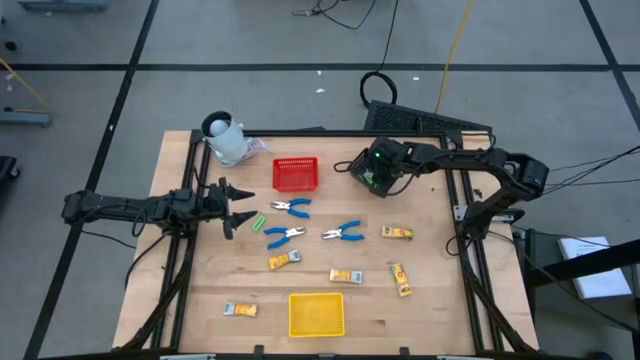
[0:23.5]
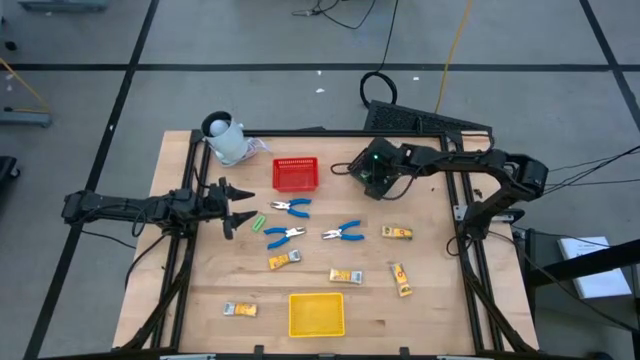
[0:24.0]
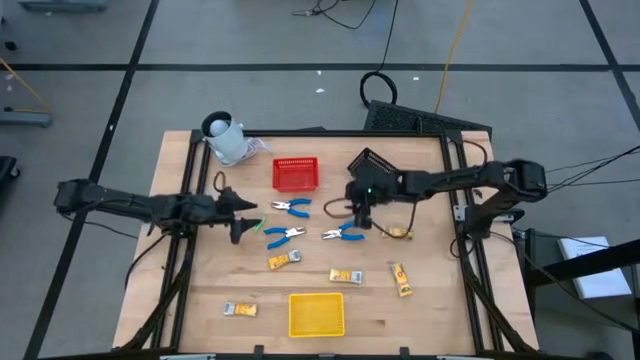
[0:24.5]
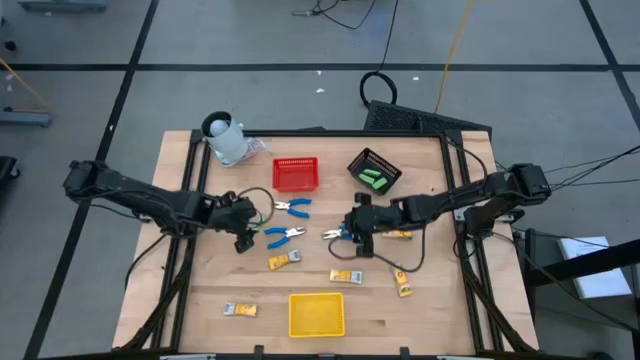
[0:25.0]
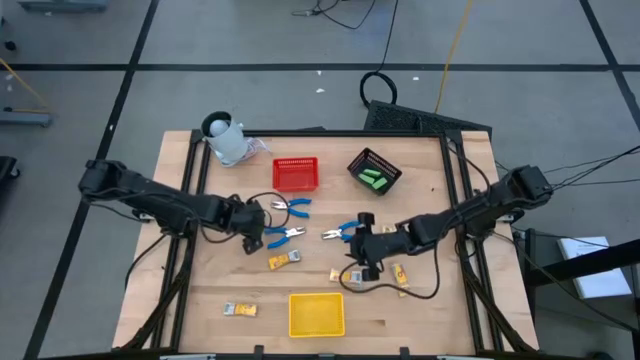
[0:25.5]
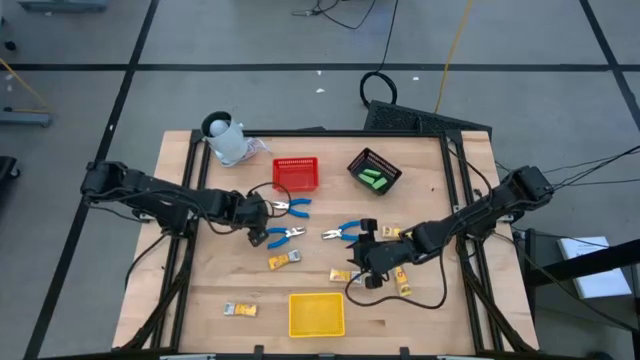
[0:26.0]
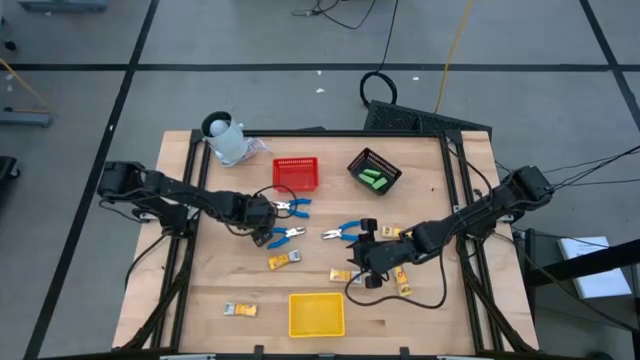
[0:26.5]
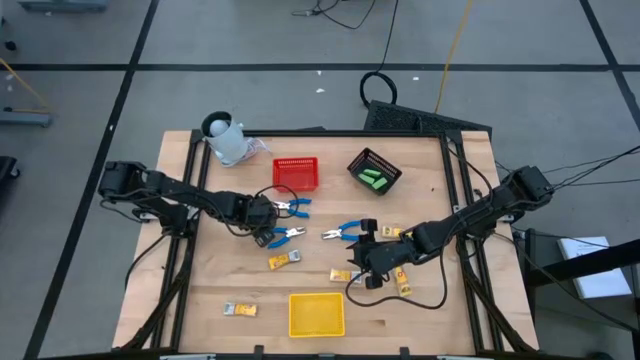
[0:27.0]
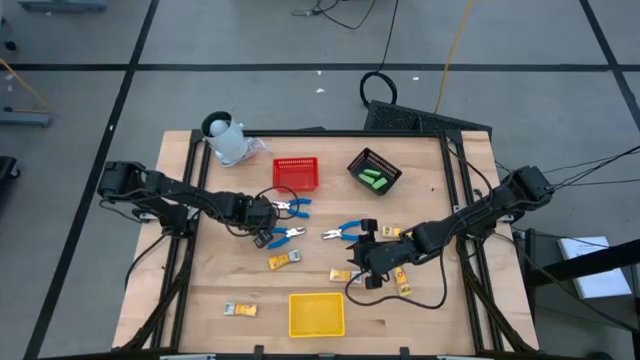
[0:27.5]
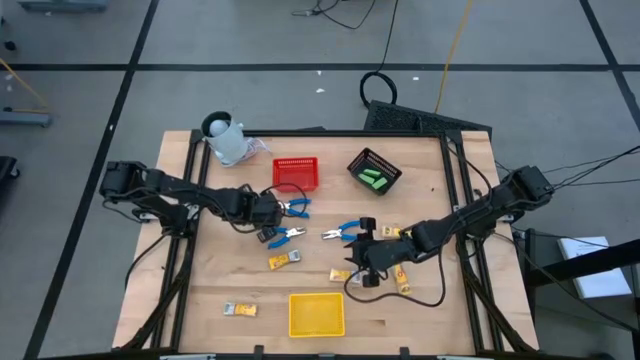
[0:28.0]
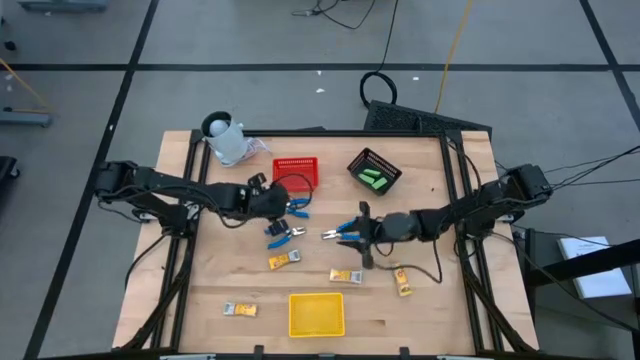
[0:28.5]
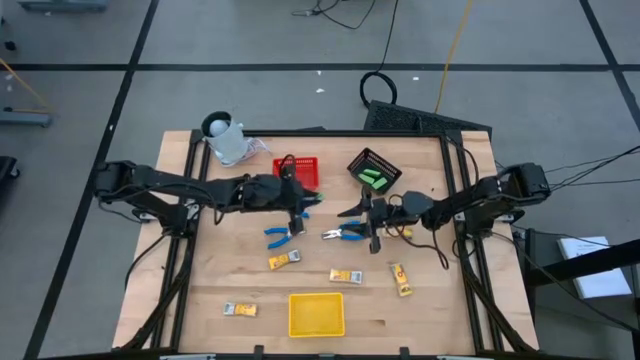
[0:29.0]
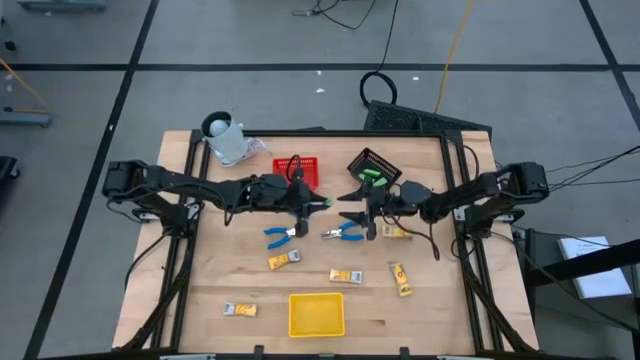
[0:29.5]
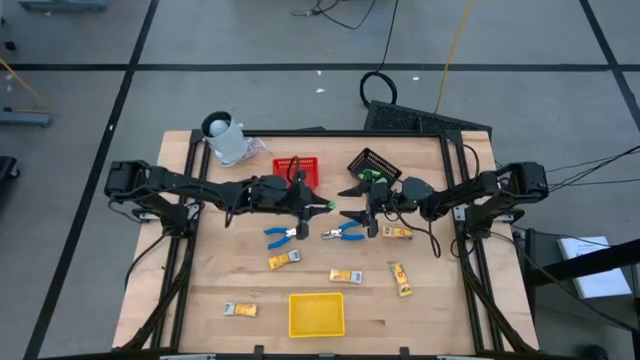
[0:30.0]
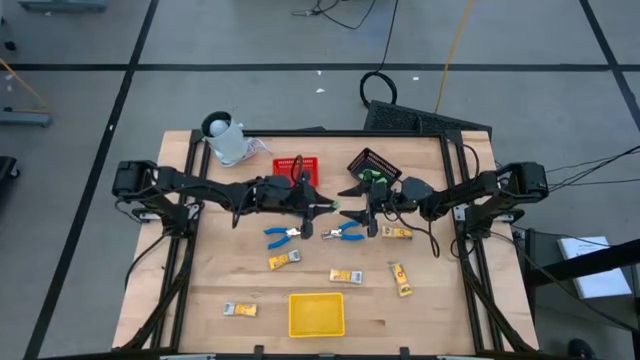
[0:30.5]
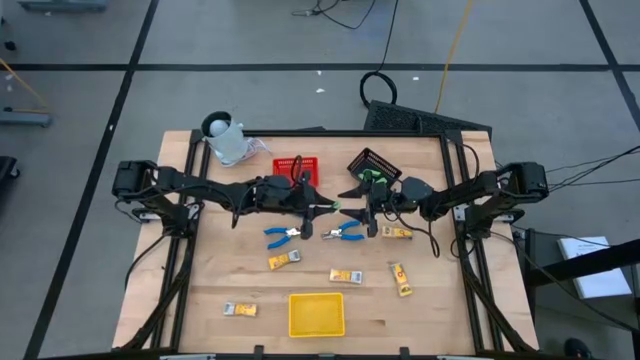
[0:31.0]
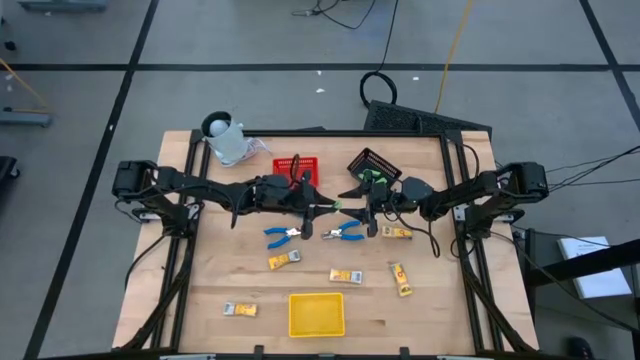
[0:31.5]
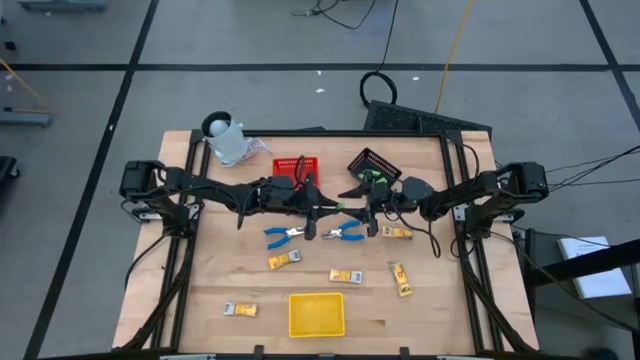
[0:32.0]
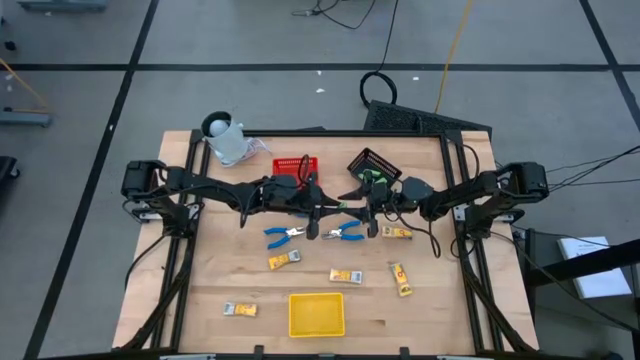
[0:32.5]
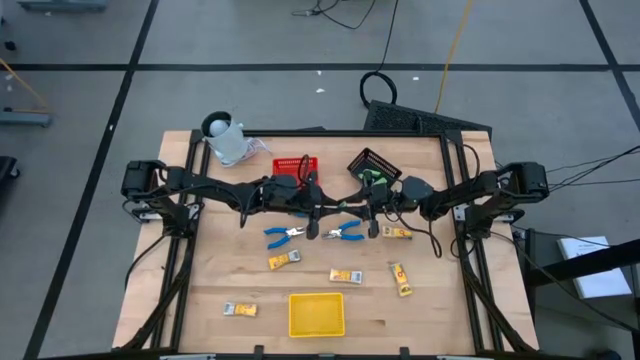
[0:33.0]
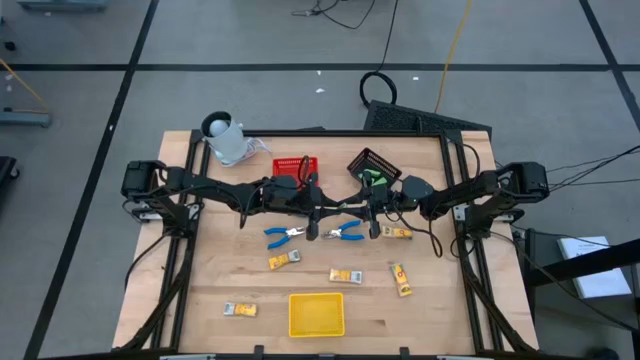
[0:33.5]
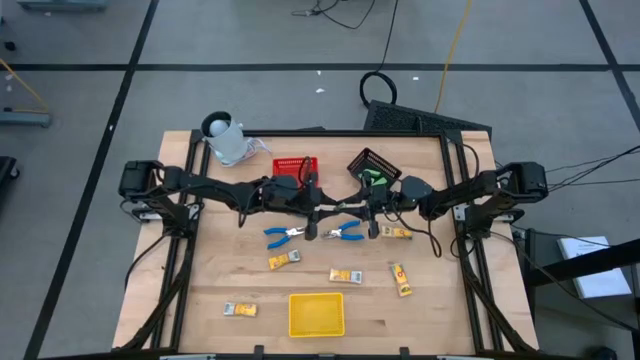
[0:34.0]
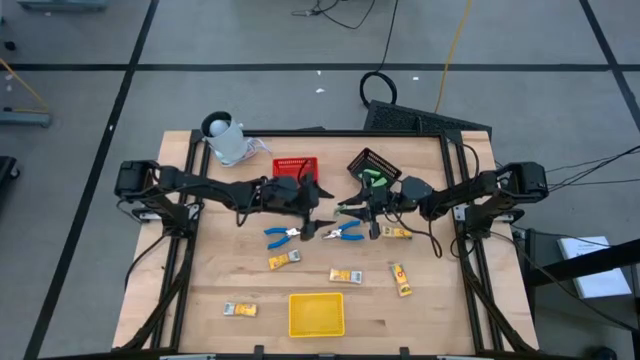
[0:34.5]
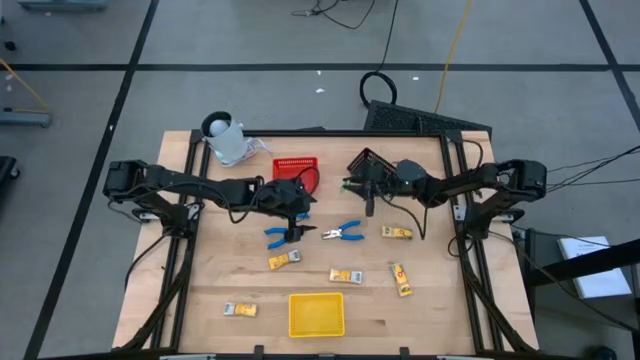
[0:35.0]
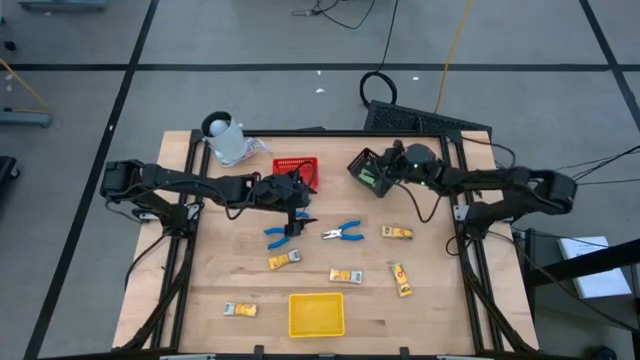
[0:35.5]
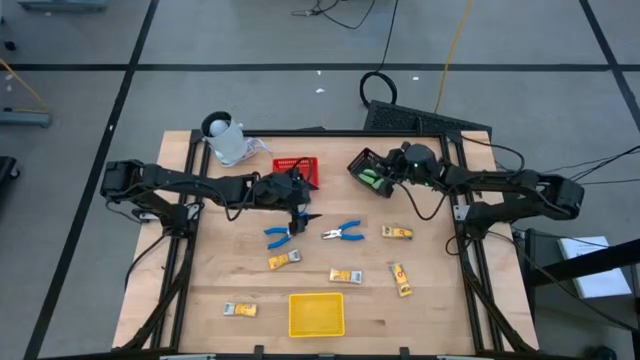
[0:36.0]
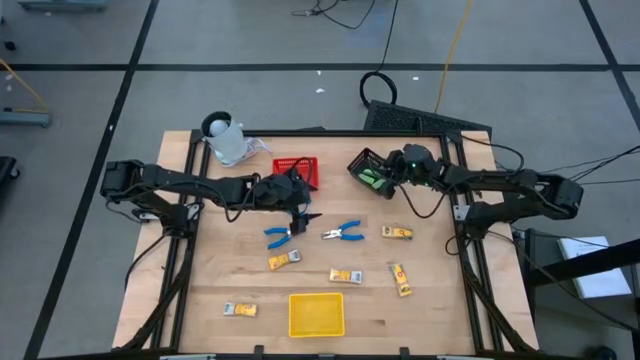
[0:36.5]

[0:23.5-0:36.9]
Task: Pick & Place School Supplies
Put the green eraser into the black bin

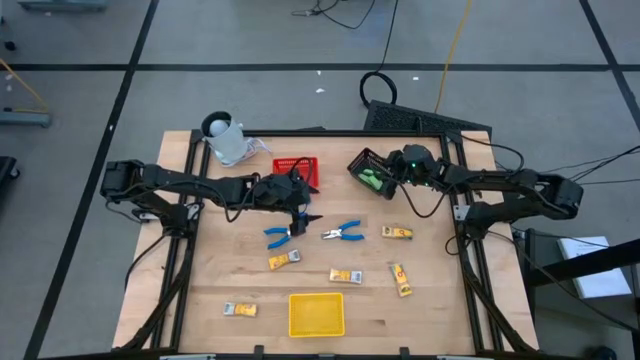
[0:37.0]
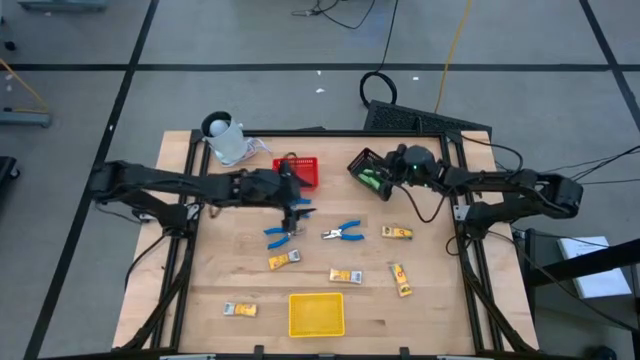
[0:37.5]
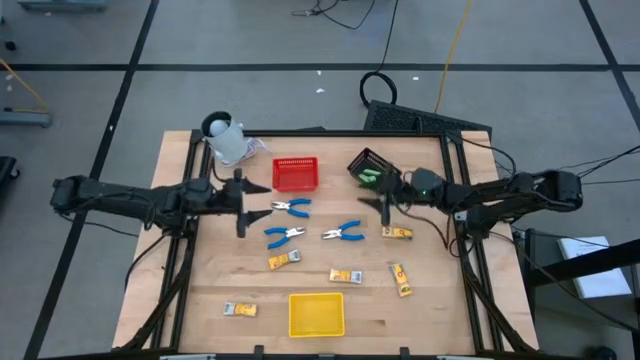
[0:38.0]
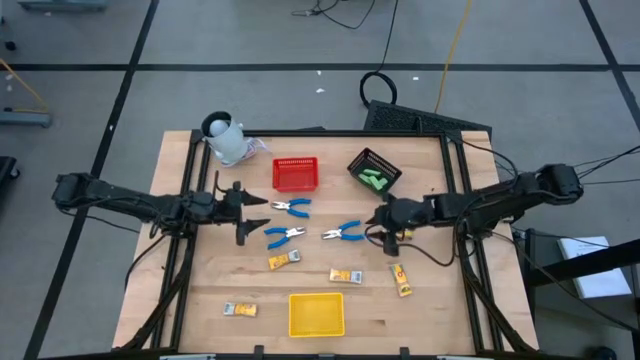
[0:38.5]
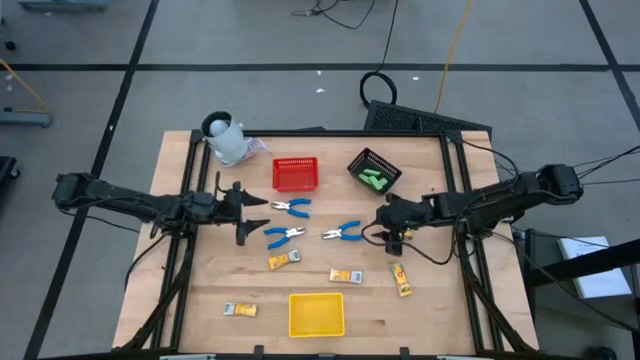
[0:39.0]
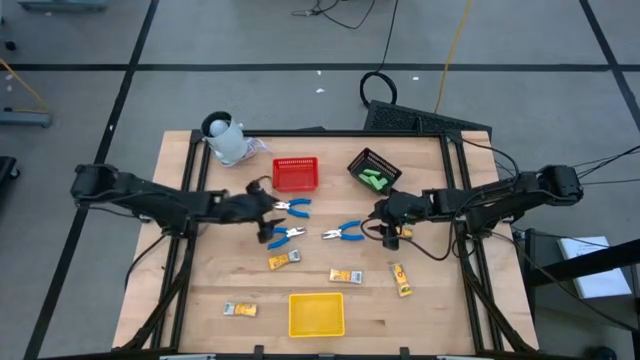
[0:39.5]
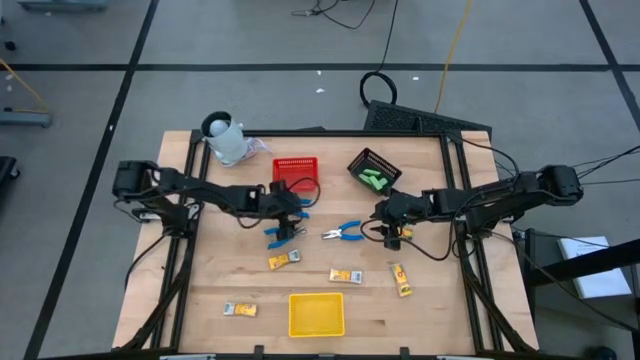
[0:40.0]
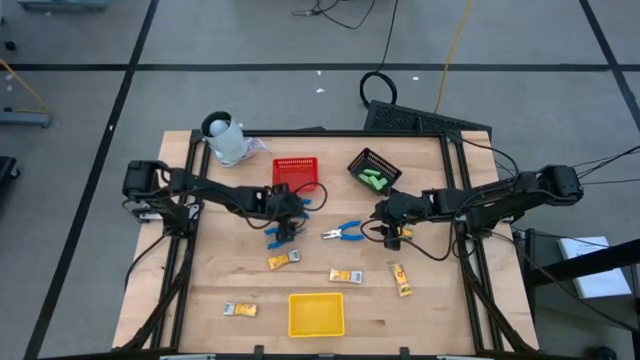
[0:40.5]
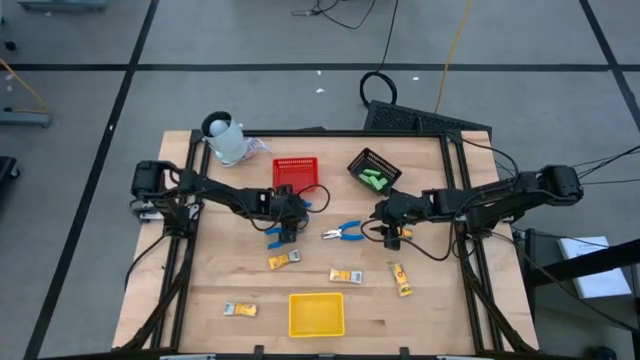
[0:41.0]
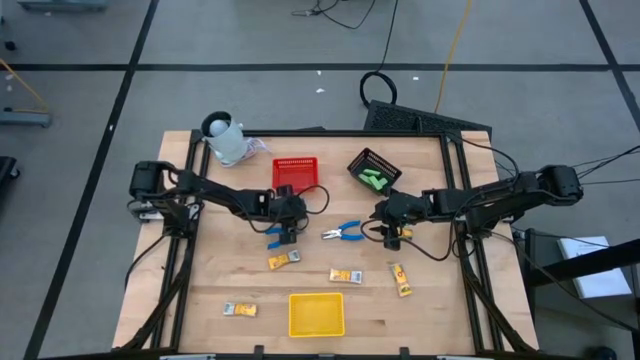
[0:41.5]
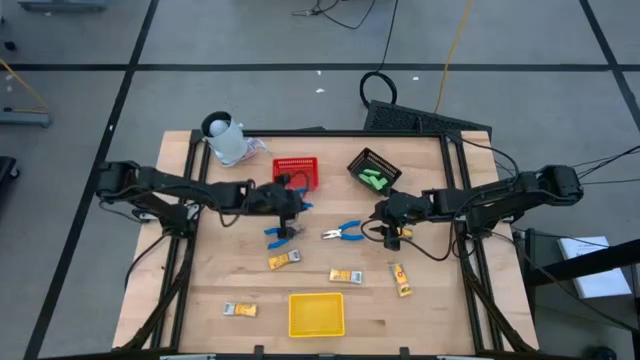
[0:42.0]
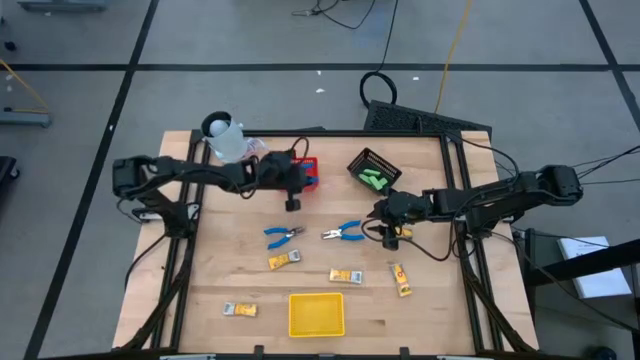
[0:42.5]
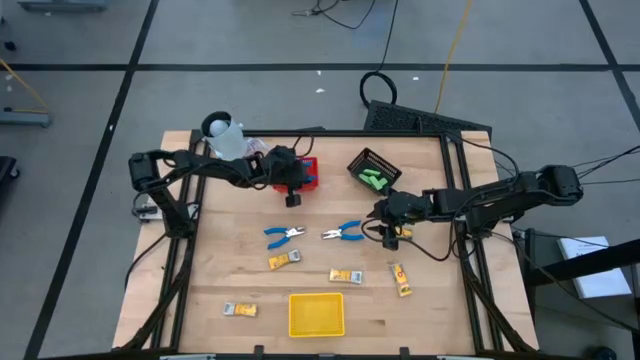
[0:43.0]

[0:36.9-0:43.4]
Put the blue hole puncher into the red bin
